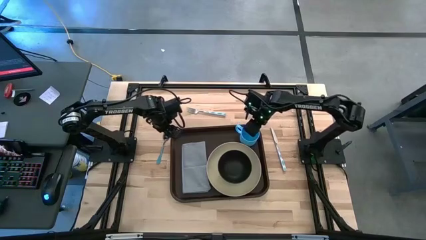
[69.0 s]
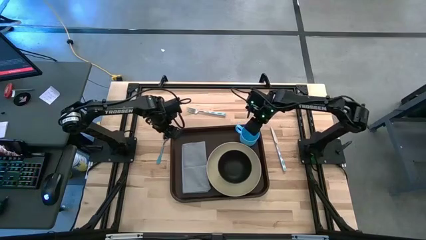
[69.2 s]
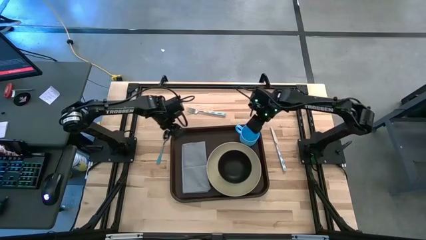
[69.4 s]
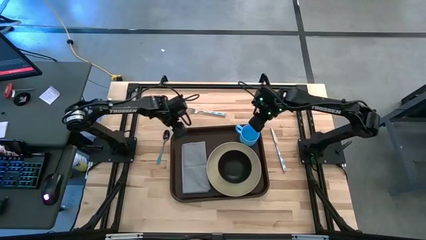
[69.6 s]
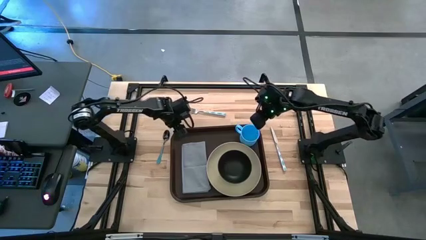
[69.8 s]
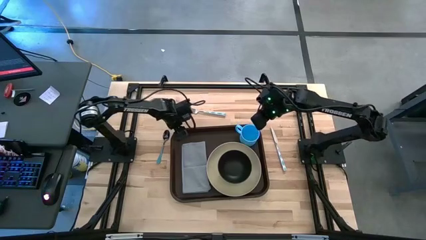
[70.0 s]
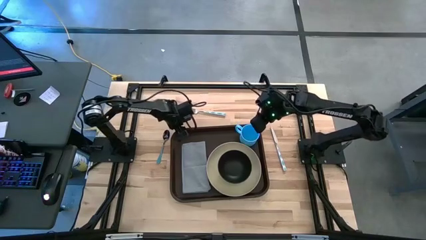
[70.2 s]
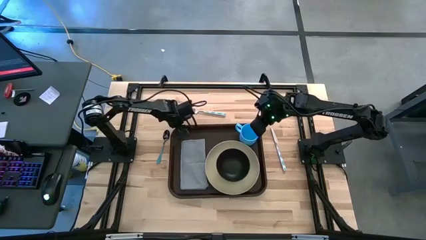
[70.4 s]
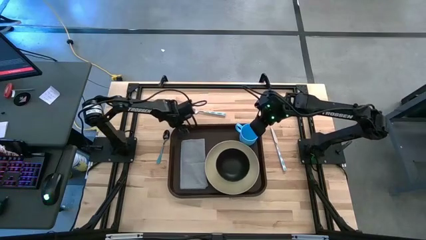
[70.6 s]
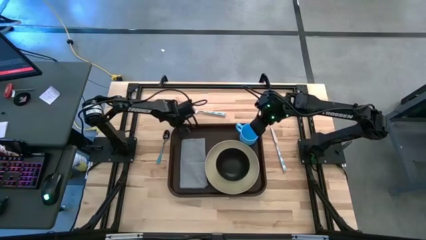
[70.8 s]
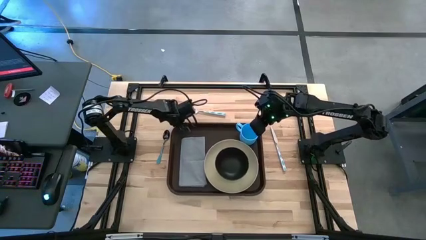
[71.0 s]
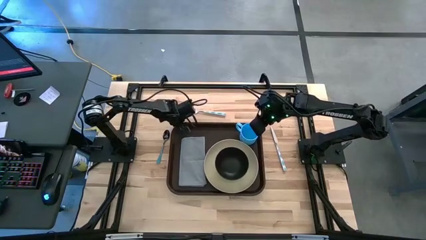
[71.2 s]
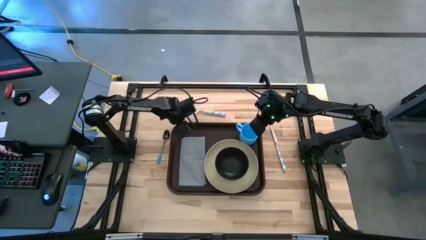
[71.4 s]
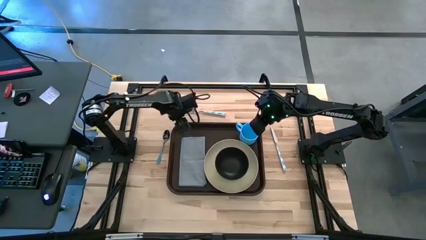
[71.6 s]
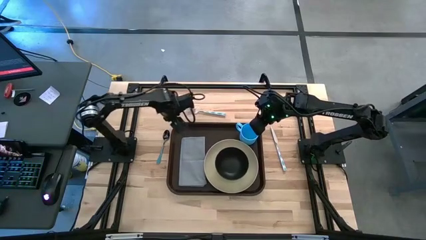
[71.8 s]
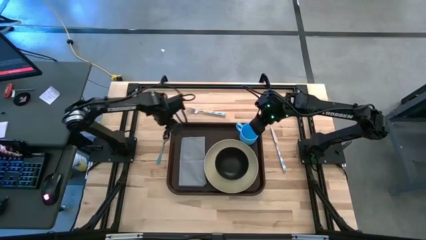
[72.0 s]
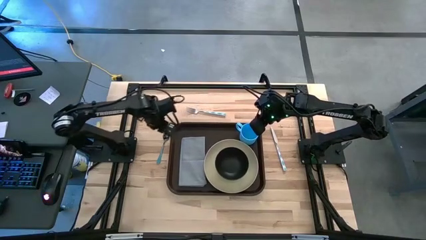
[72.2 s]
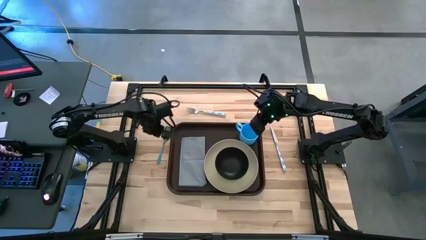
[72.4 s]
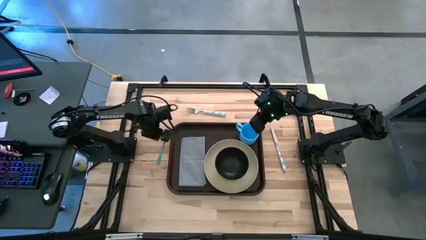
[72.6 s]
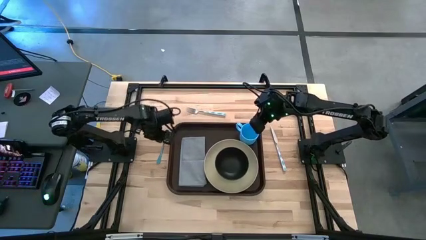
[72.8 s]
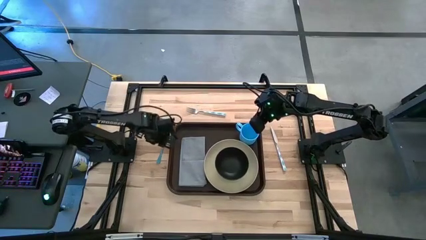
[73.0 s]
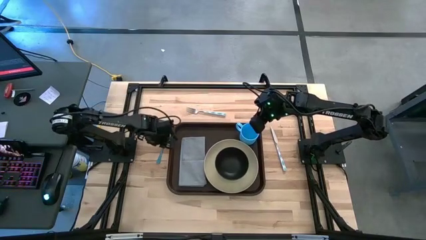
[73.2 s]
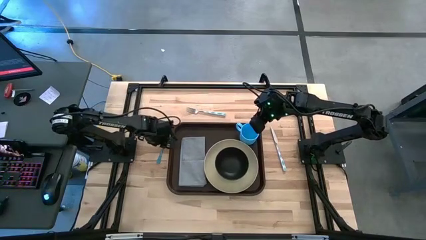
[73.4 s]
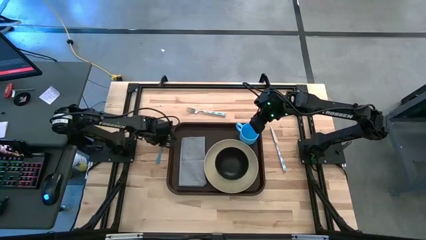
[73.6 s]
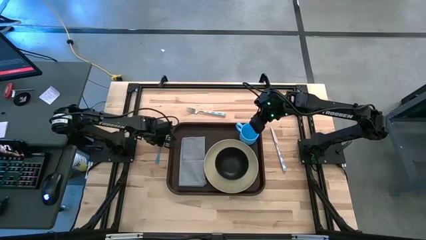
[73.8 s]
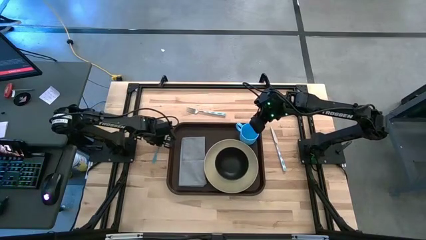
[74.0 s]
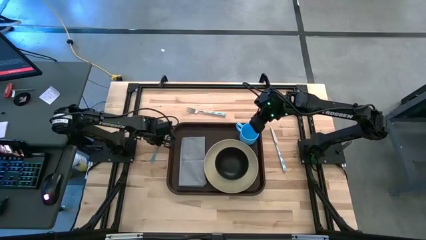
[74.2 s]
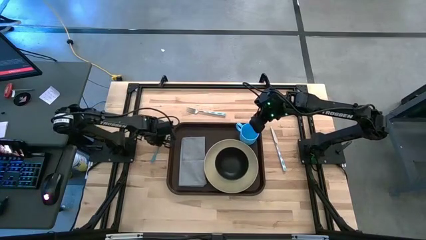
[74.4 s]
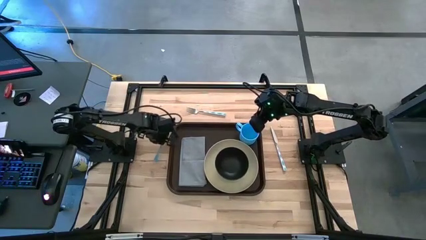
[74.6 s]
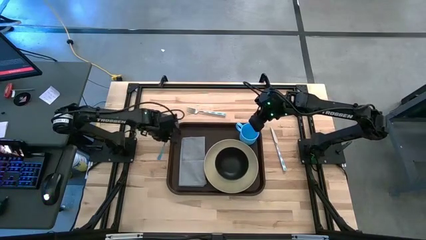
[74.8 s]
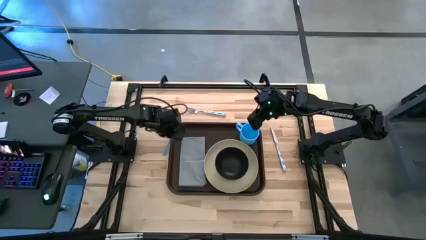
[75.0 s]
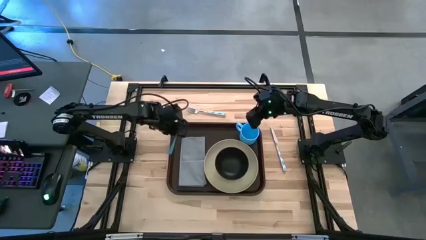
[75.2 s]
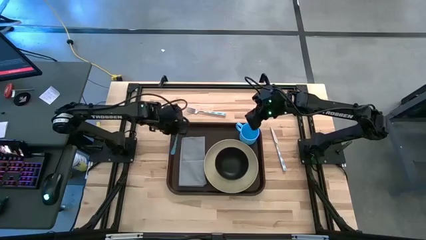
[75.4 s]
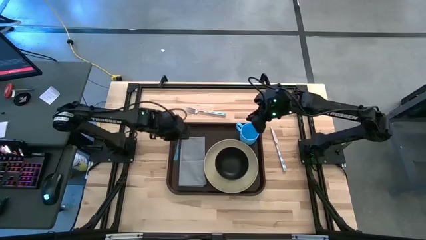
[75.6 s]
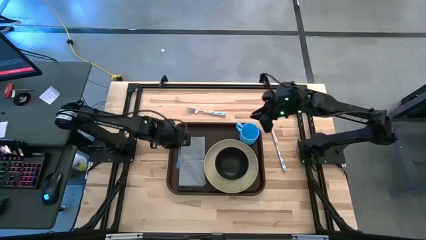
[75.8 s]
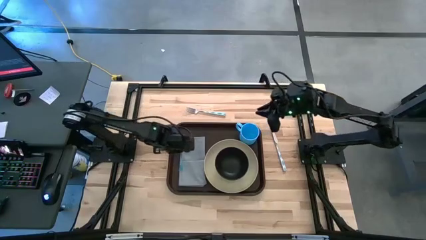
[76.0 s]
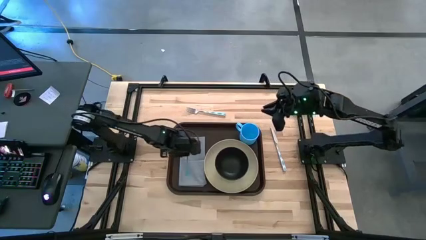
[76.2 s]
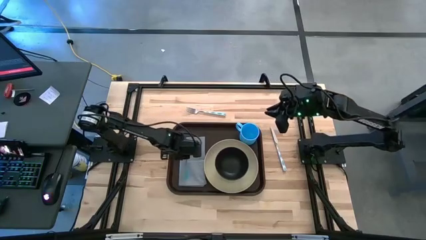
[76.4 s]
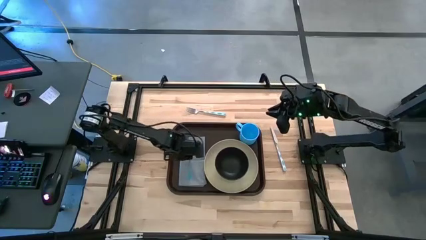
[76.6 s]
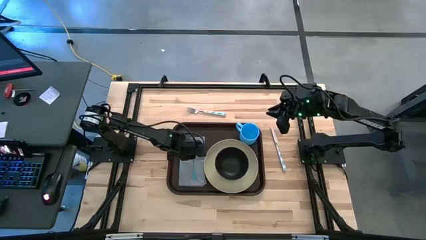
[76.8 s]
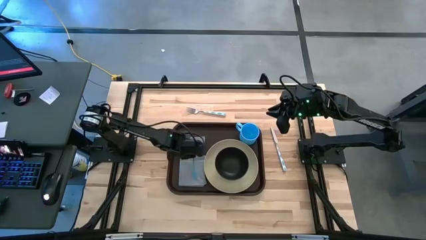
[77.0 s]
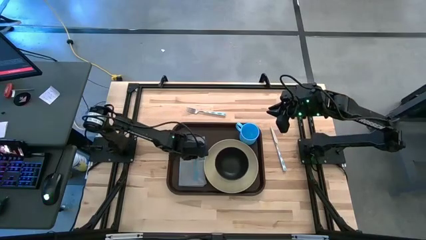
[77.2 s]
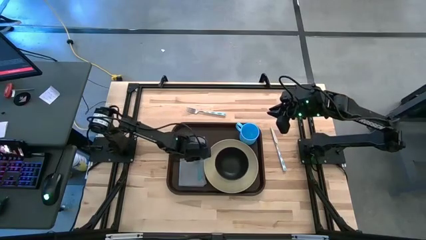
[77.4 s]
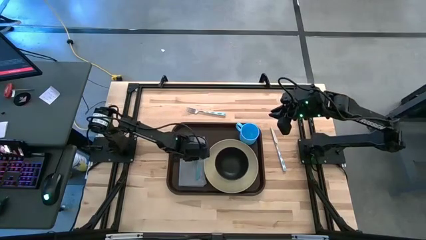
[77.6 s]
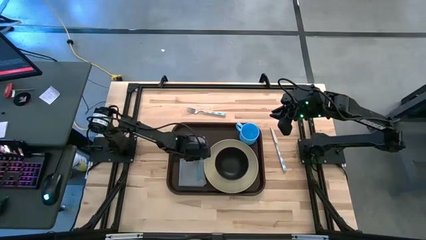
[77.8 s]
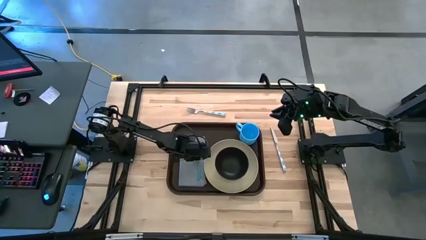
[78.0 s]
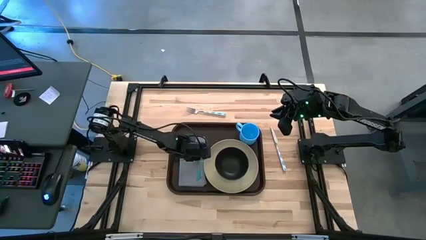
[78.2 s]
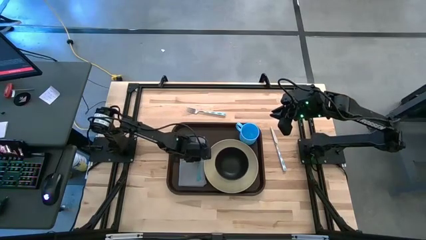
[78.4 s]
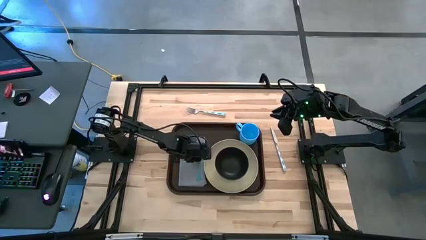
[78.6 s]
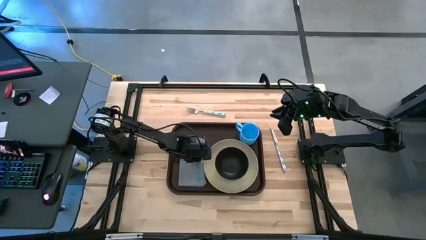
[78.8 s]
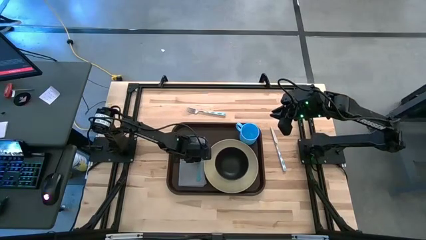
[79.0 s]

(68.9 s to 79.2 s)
Task: Set up tray
Put the blue spoon on top of the gray napkin on the dark brown serving tray

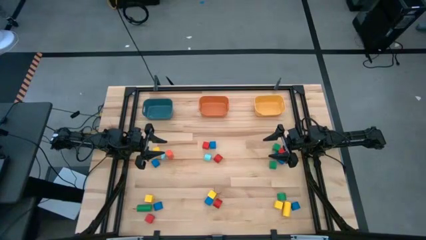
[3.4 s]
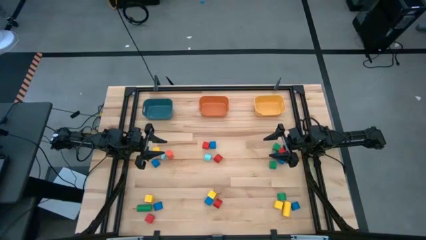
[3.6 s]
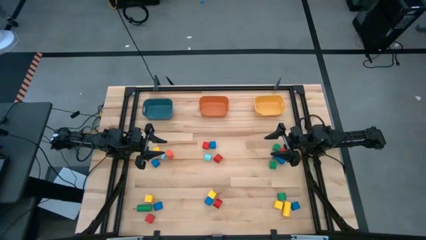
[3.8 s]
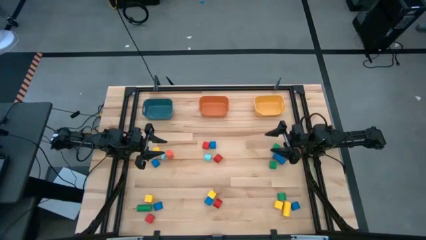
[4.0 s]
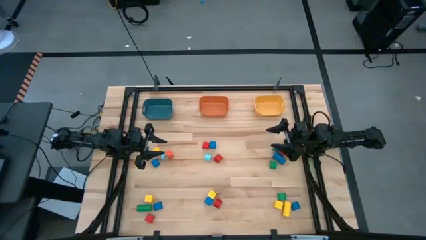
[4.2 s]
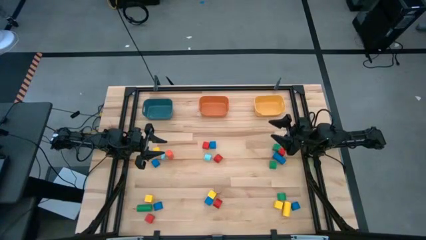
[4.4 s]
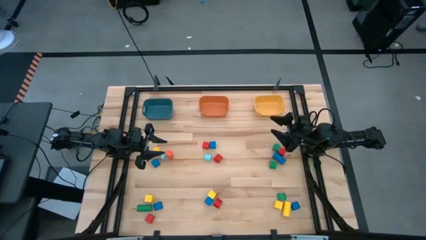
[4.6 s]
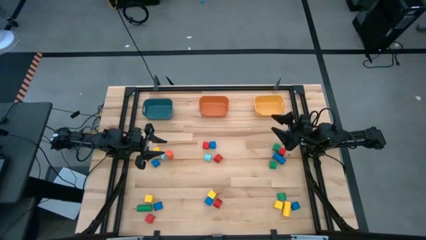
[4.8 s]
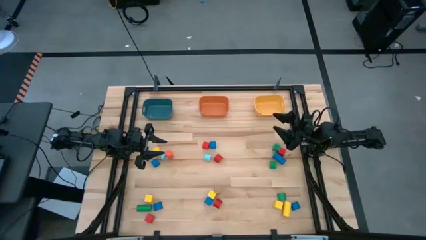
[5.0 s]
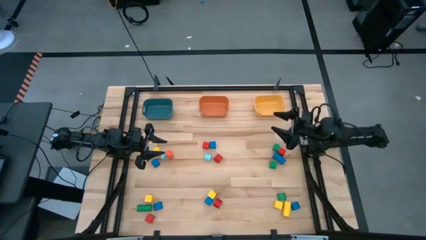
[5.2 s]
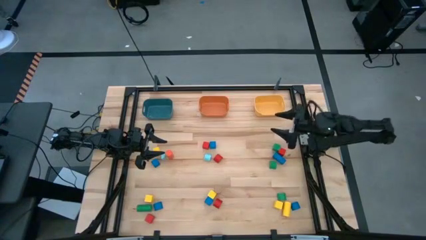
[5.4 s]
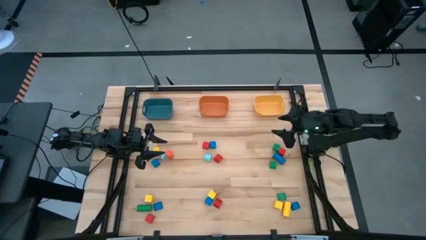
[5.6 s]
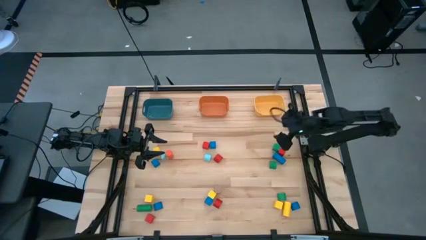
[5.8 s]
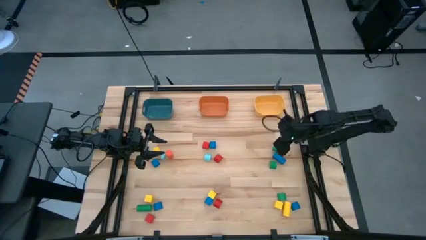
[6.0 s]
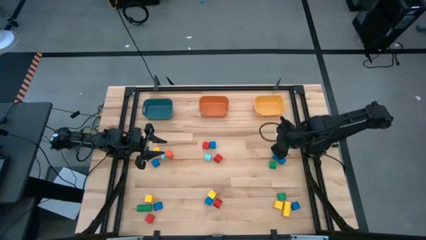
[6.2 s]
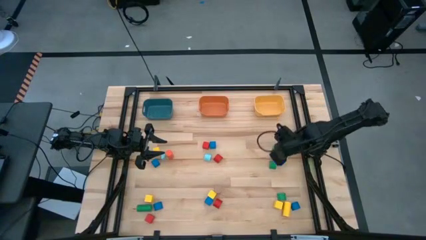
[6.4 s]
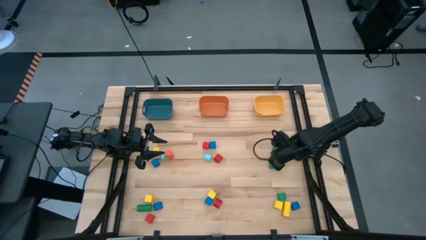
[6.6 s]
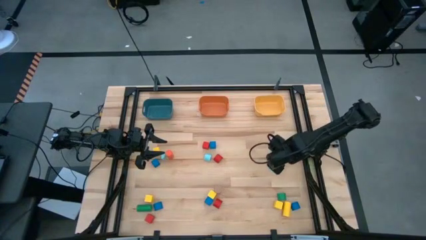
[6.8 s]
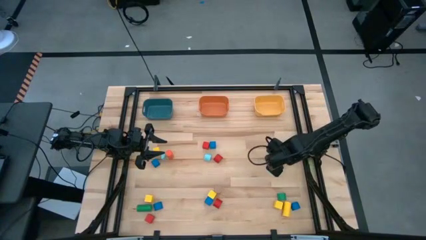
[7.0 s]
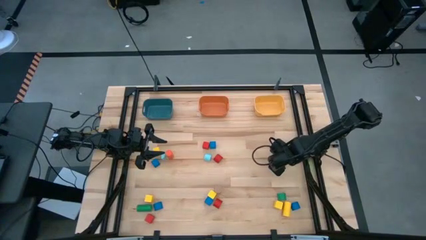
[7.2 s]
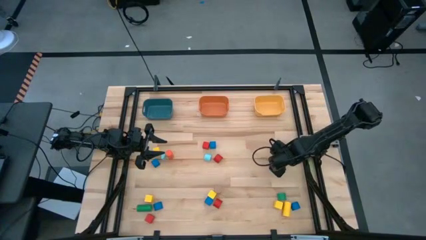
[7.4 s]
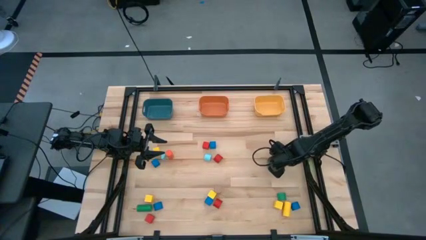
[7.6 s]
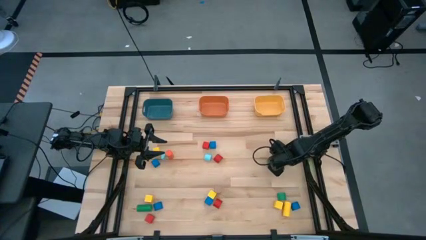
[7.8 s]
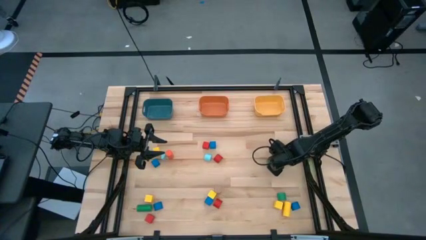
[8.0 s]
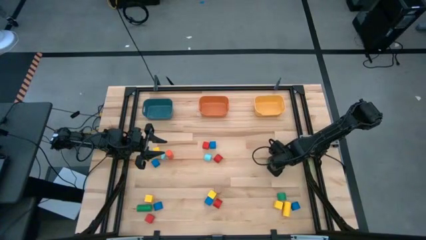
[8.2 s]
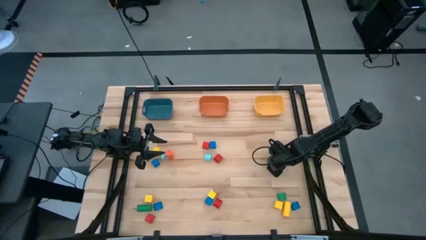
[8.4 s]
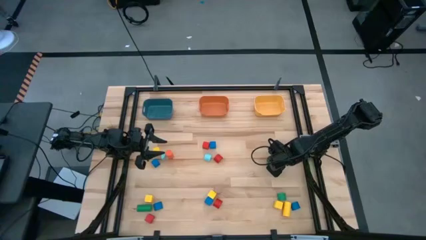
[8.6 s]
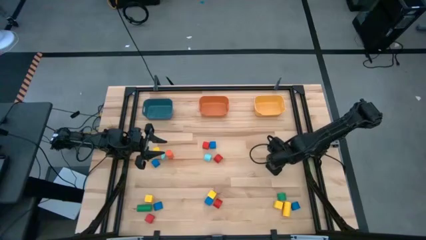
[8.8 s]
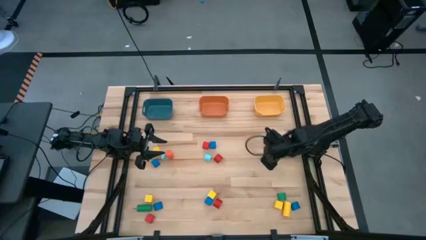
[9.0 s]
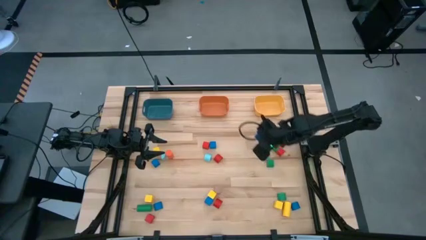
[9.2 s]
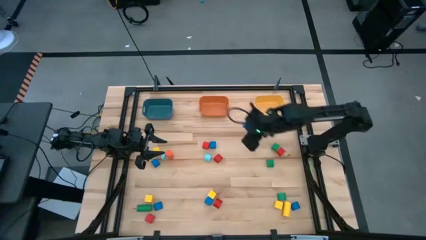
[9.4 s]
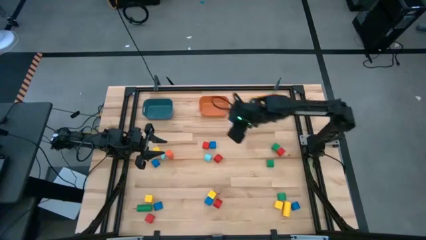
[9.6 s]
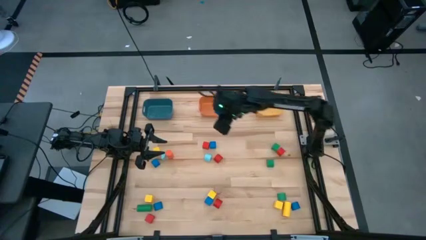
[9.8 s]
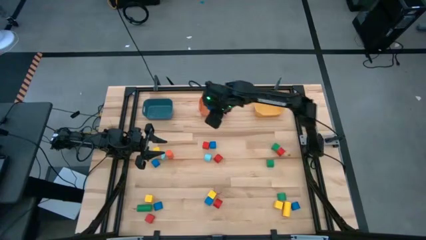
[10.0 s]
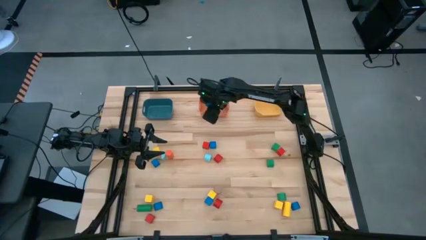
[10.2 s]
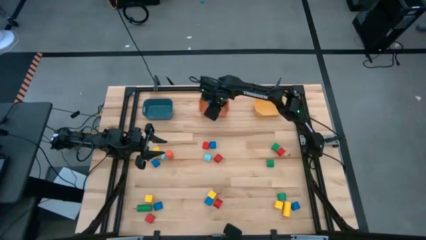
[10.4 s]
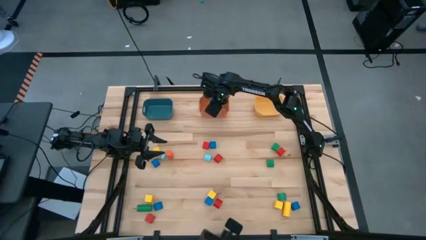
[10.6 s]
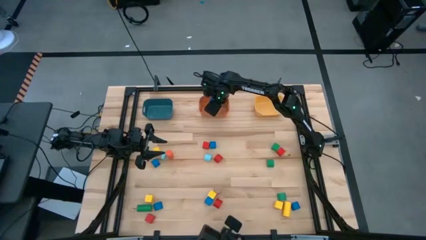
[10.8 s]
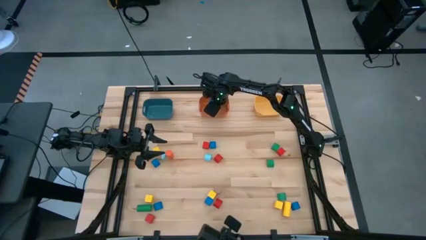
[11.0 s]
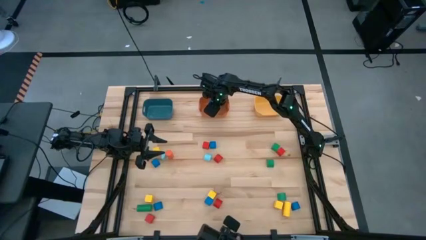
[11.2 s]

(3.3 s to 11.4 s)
Task: Sort blocks by size
Put the blue cylindrical block into the orange bin
